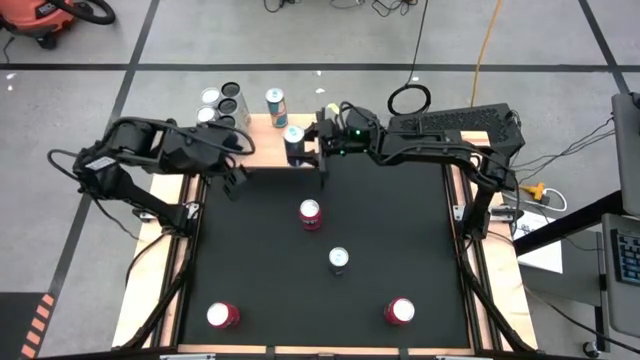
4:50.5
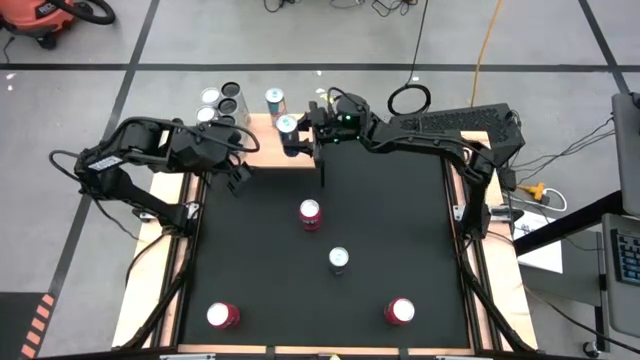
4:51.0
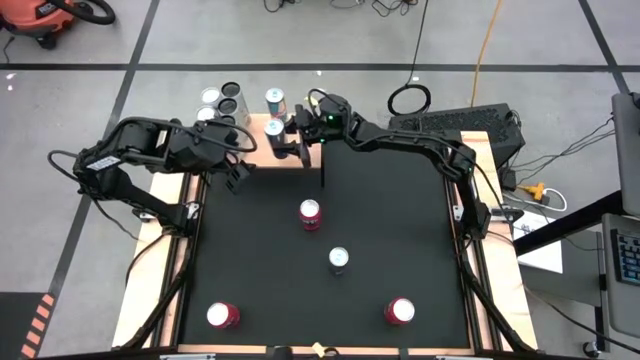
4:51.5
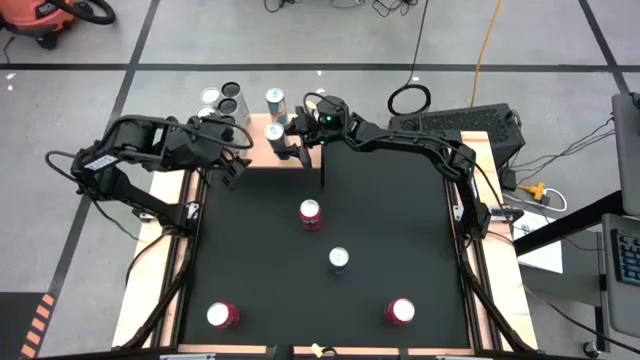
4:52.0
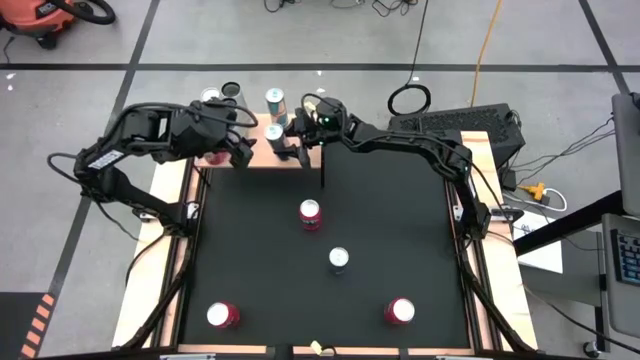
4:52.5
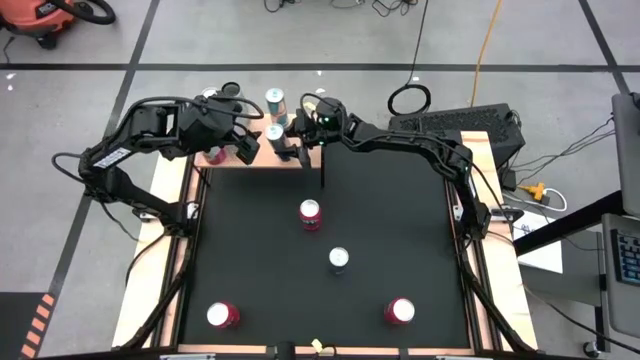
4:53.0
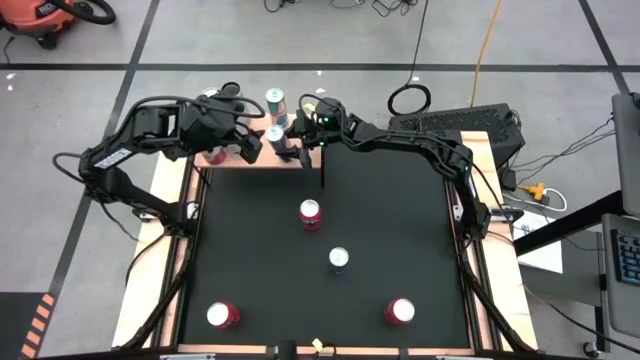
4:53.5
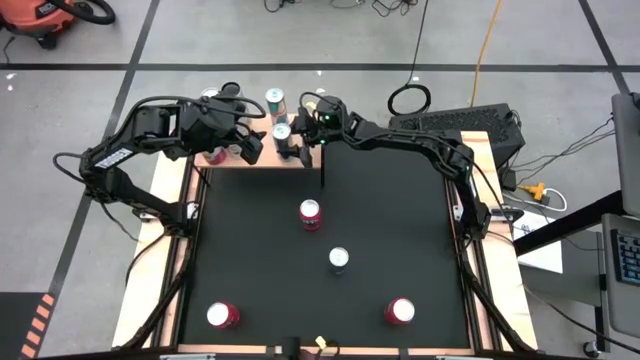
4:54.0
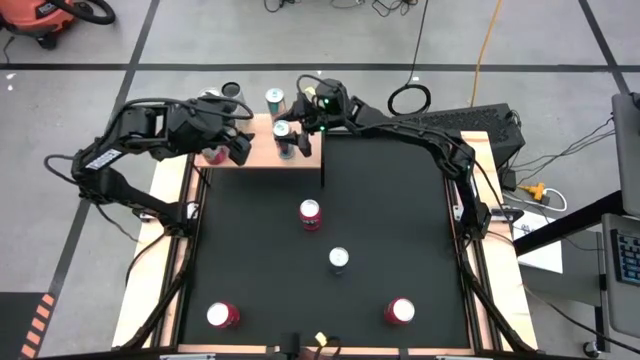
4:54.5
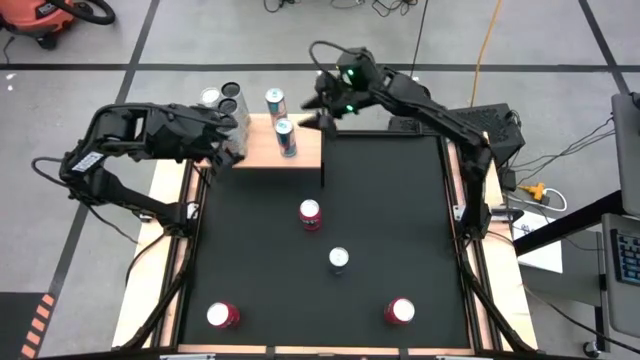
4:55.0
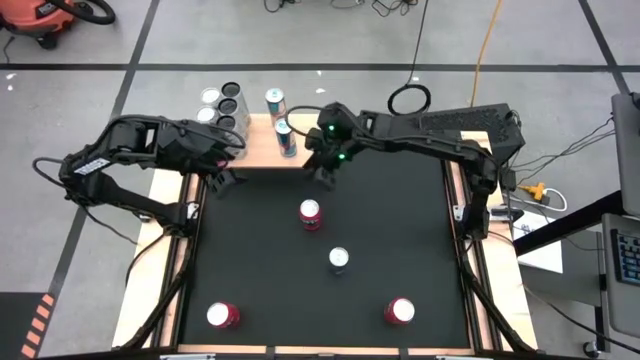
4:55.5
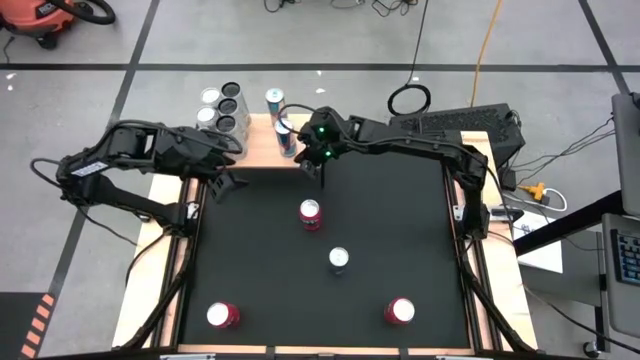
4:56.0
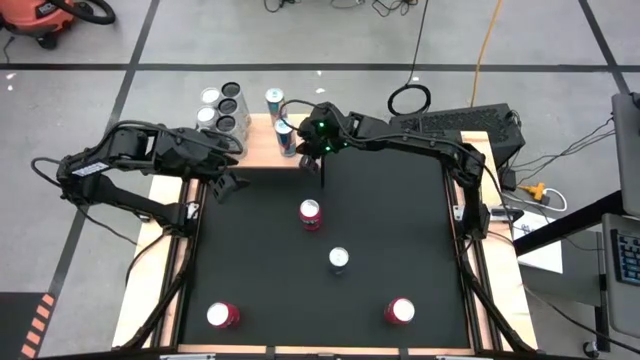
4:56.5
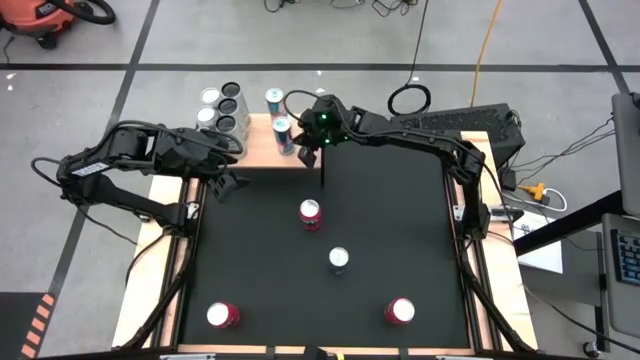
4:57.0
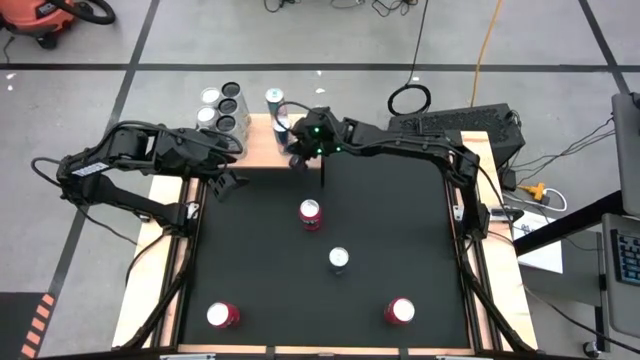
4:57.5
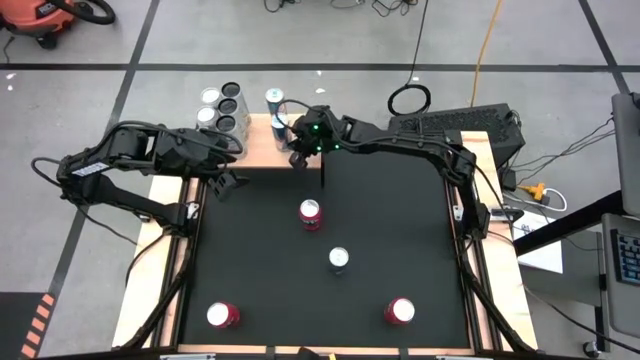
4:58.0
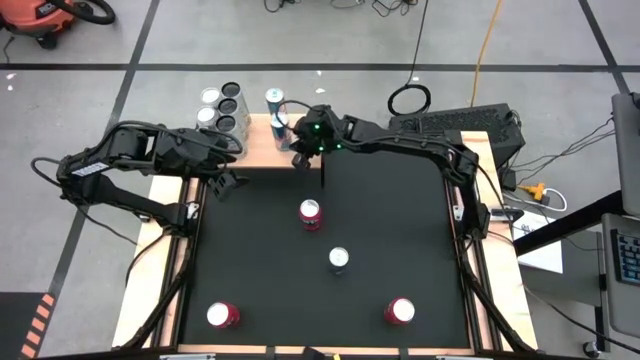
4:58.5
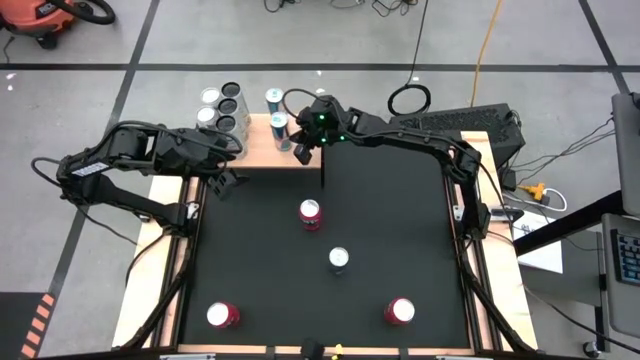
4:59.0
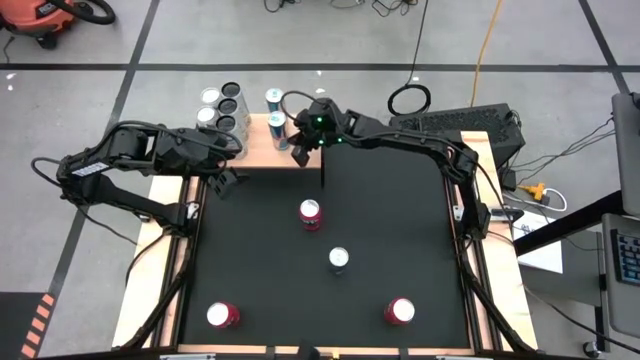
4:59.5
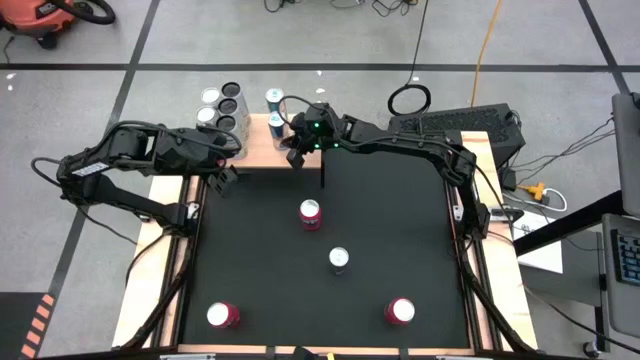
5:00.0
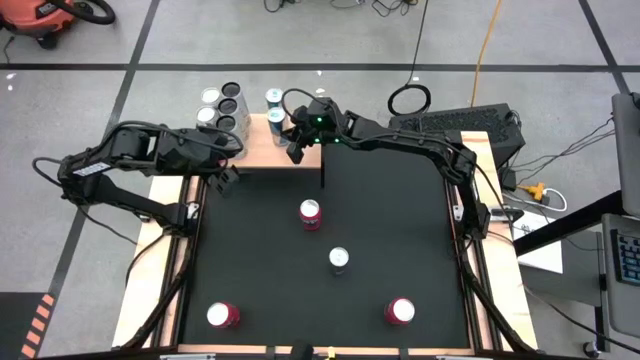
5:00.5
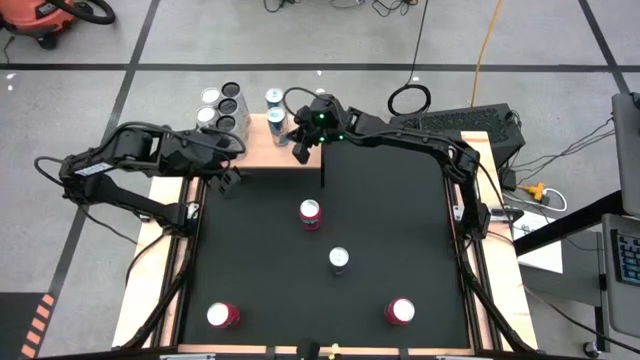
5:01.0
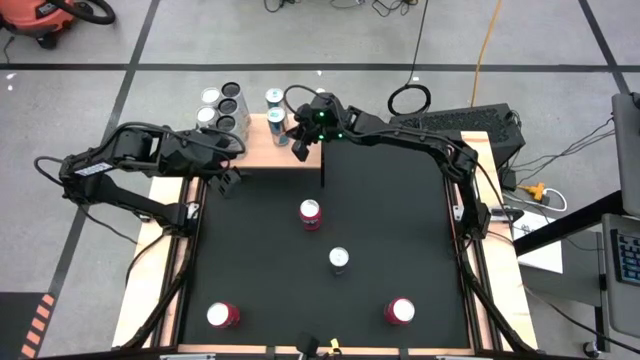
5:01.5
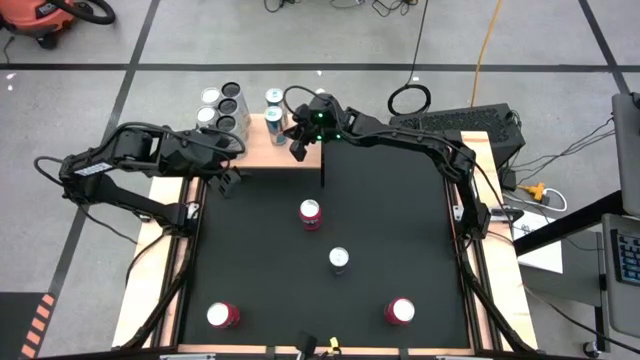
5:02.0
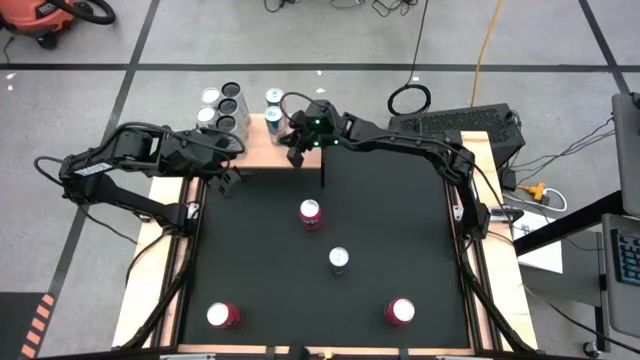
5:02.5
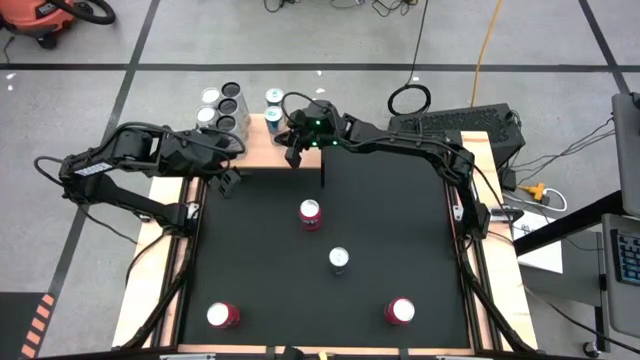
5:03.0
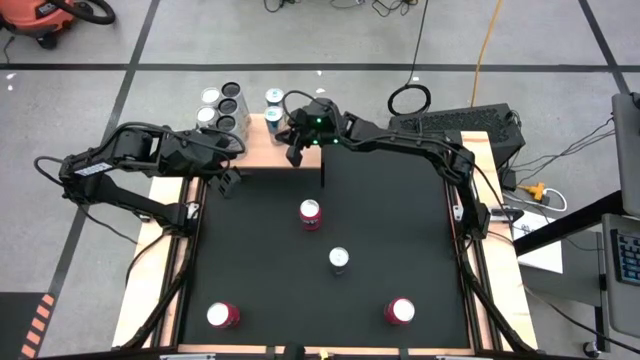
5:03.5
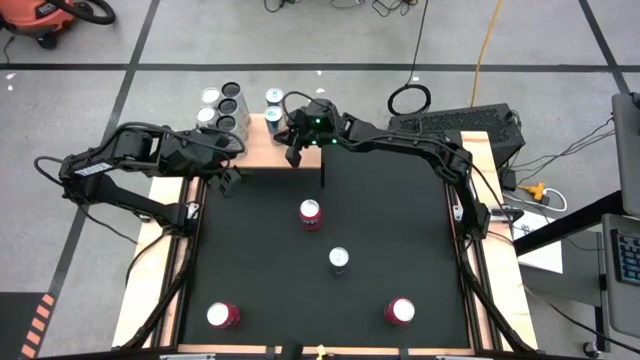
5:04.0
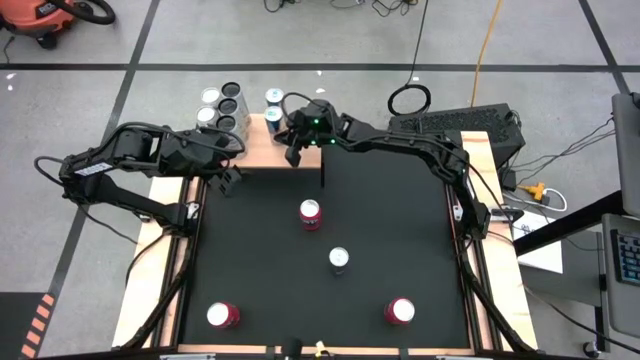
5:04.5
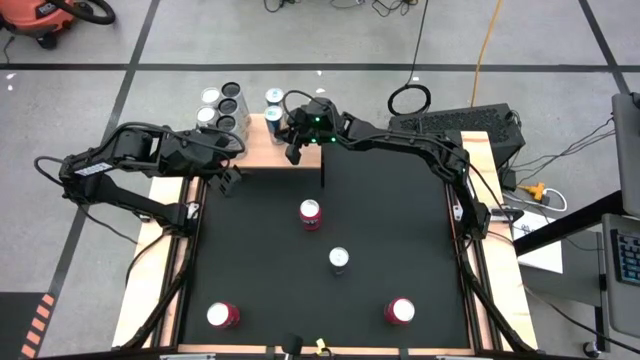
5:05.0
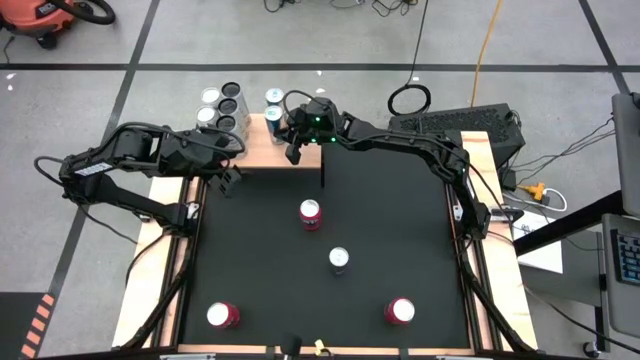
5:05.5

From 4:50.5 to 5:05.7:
Task: Place canned beverage on shelf
Put the top blue soda can on the shelf aligned with the other blue soda can

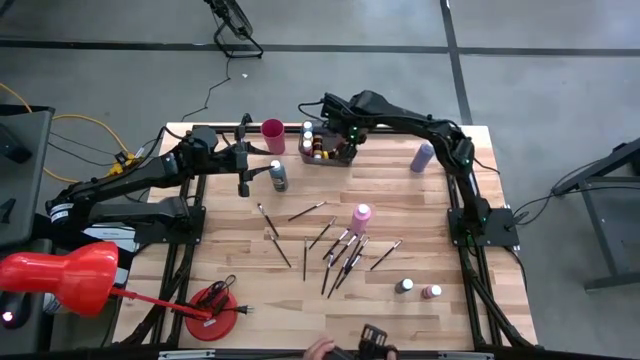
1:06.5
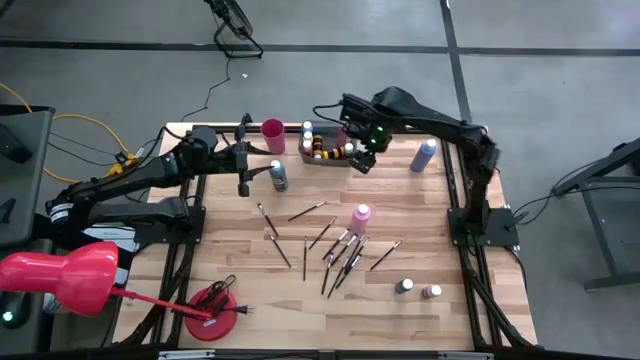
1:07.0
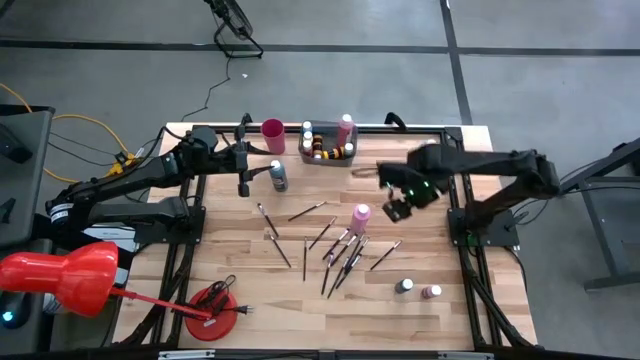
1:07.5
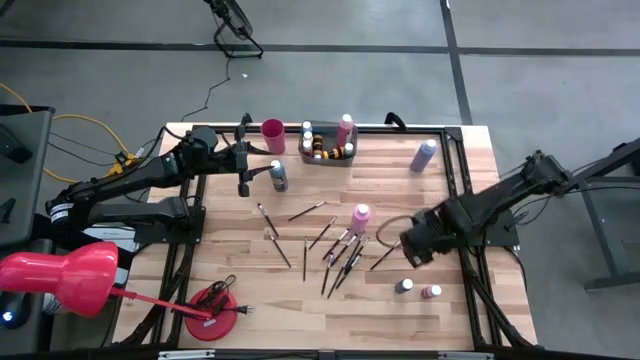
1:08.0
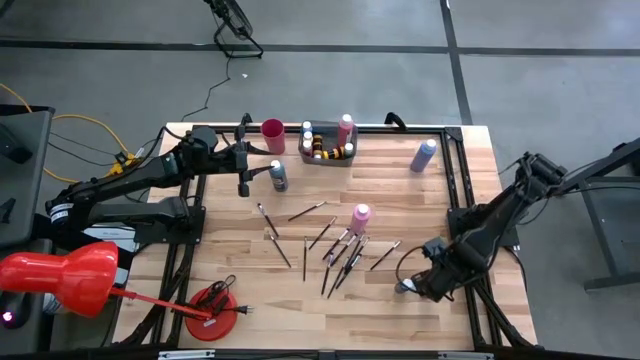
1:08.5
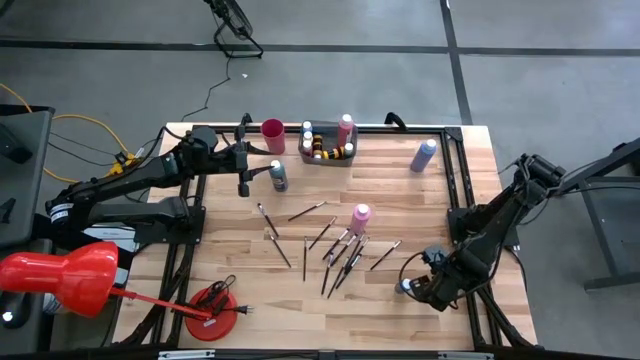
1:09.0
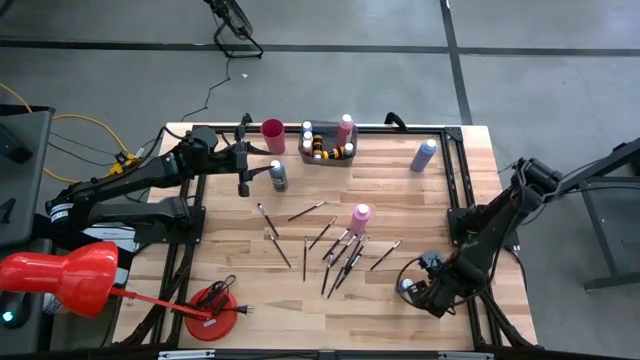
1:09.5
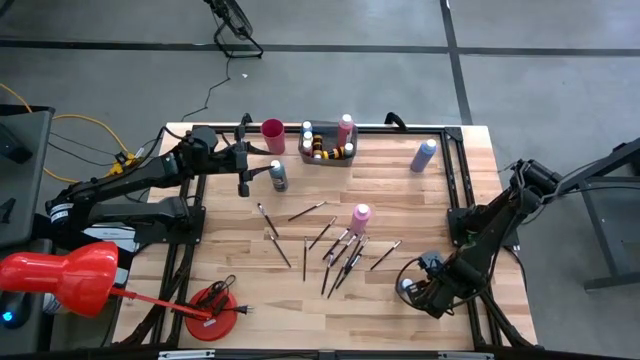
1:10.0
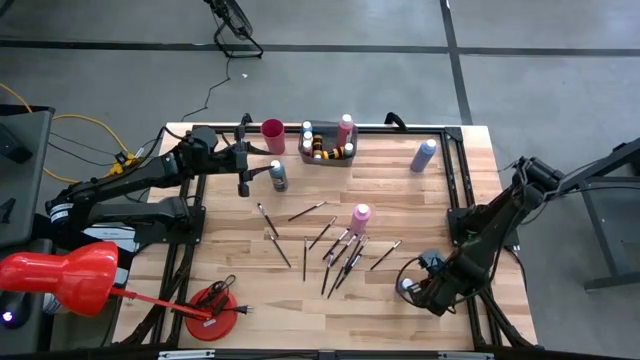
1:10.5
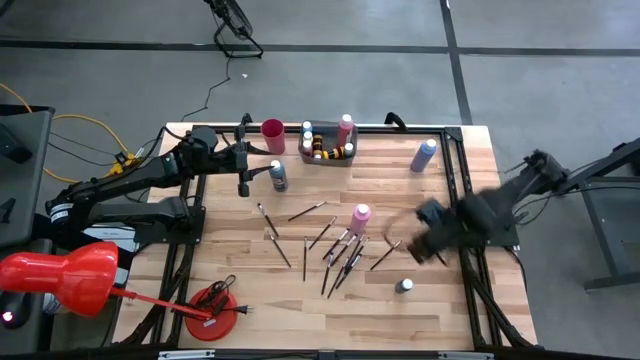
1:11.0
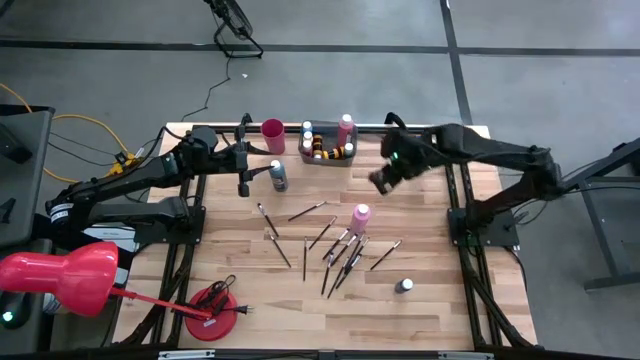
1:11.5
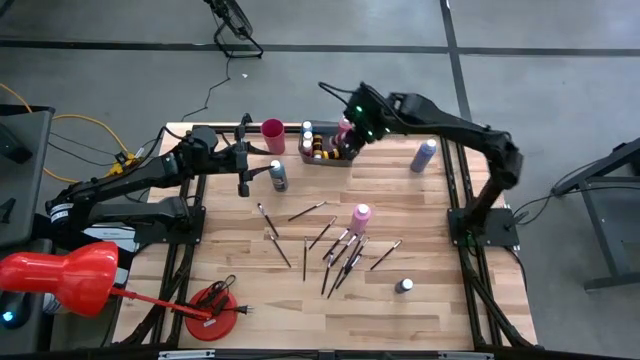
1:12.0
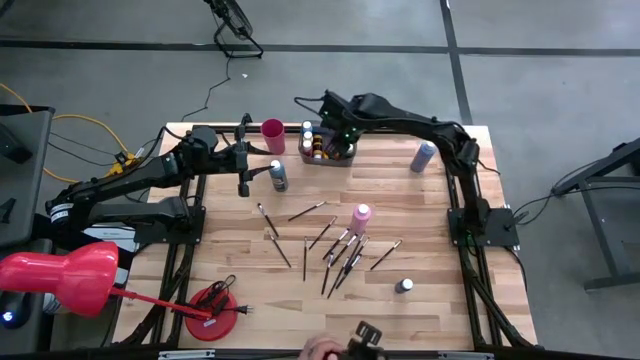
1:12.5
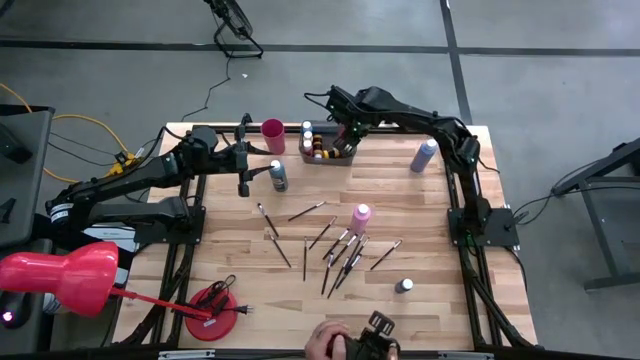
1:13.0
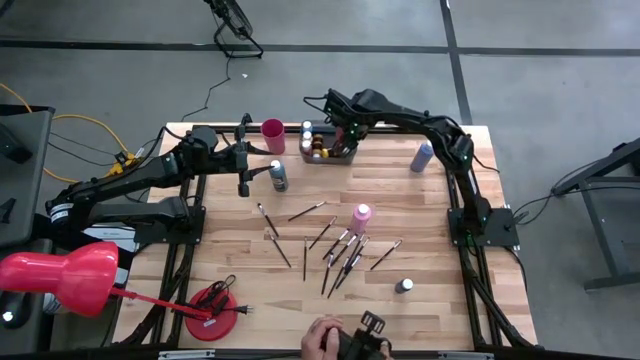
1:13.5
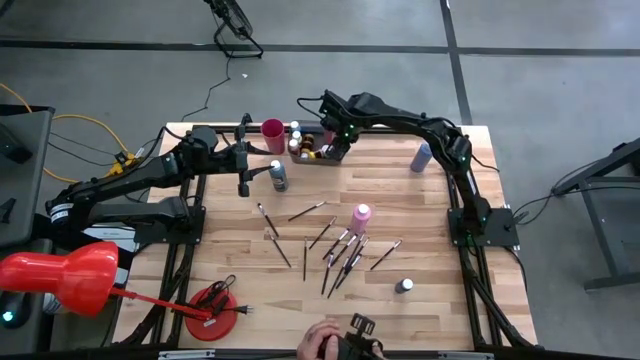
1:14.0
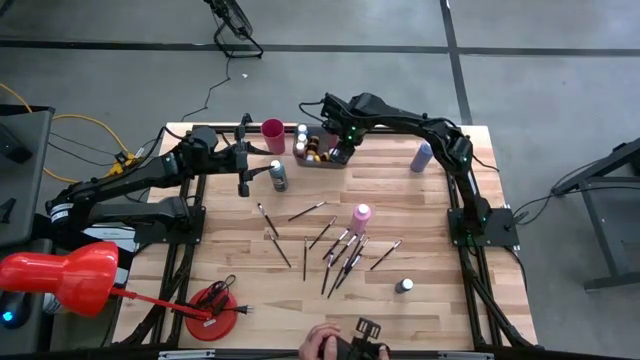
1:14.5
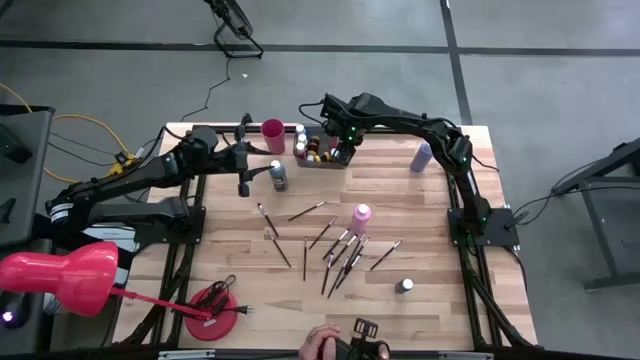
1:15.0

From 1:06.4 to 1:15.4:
Task: Pick & Place Paint Supplies
Put the small pink paint bottle into the black bin
